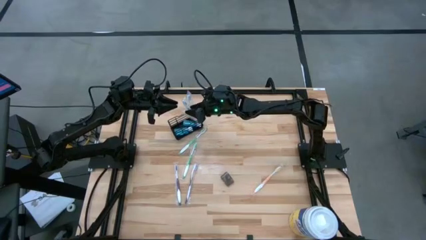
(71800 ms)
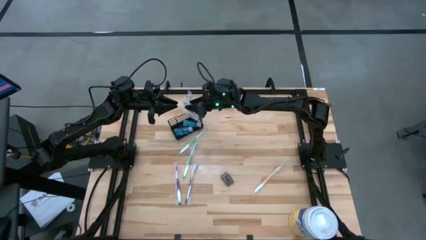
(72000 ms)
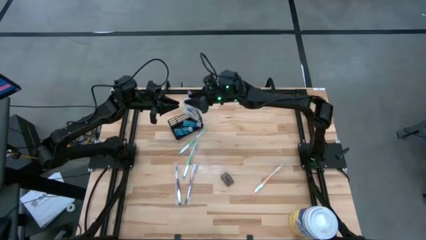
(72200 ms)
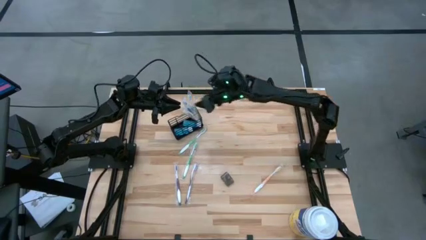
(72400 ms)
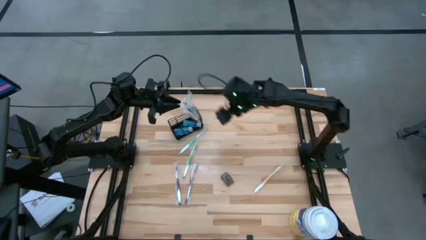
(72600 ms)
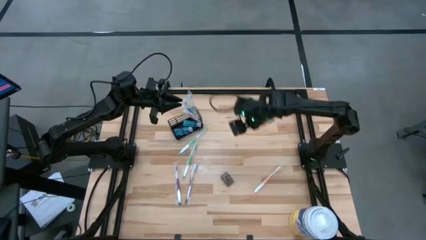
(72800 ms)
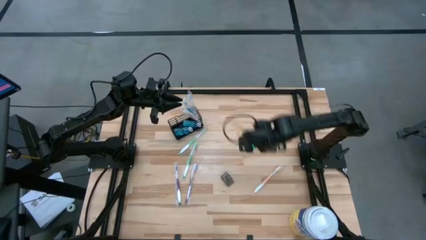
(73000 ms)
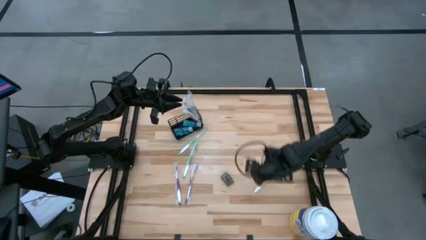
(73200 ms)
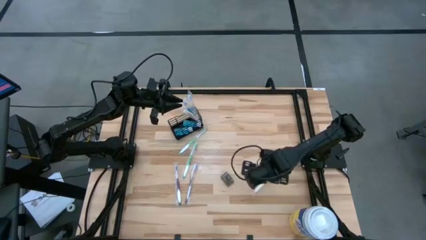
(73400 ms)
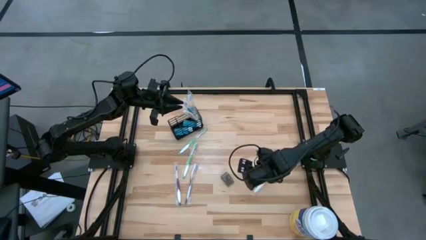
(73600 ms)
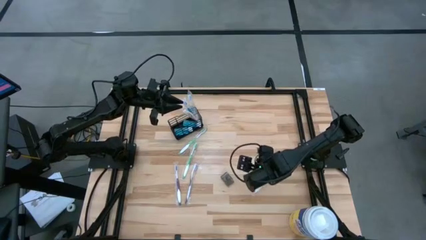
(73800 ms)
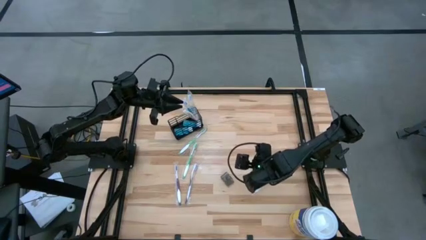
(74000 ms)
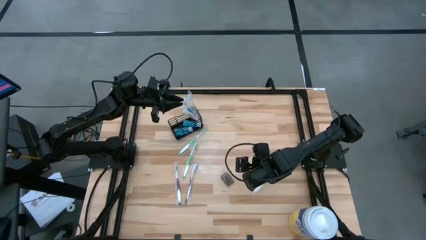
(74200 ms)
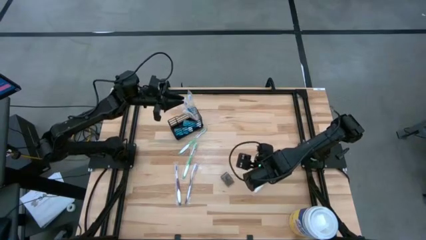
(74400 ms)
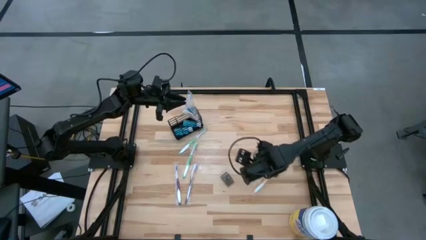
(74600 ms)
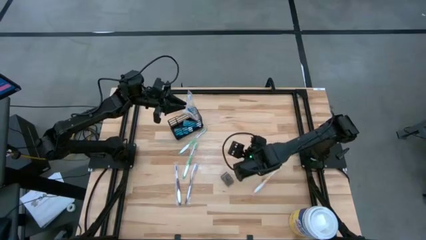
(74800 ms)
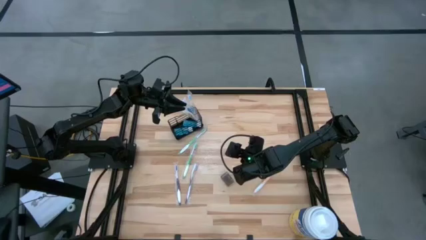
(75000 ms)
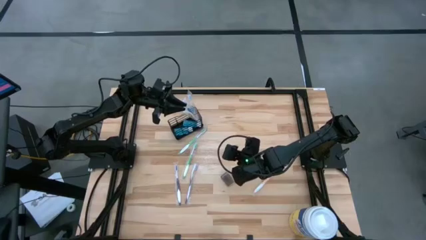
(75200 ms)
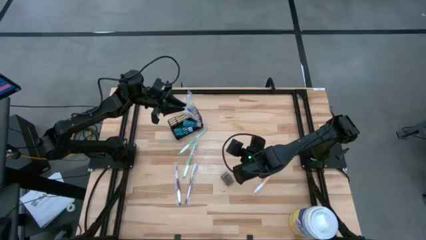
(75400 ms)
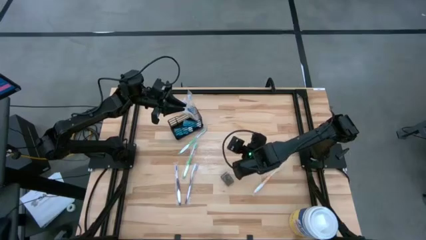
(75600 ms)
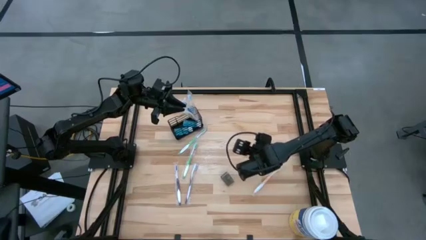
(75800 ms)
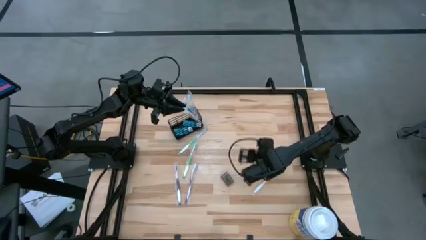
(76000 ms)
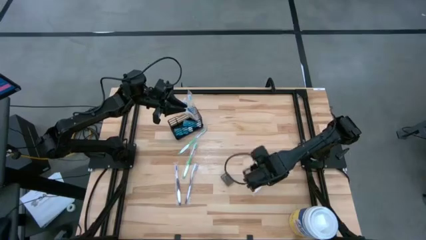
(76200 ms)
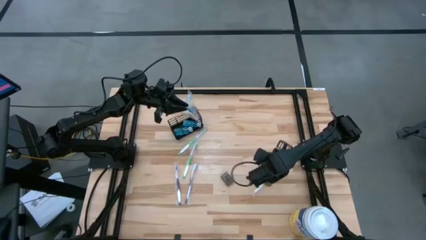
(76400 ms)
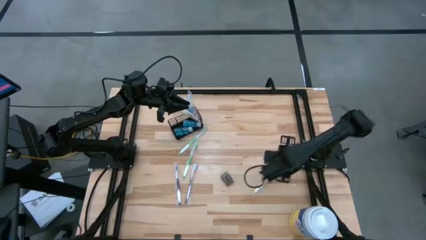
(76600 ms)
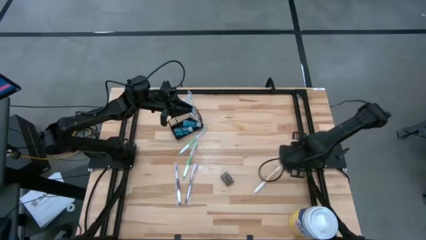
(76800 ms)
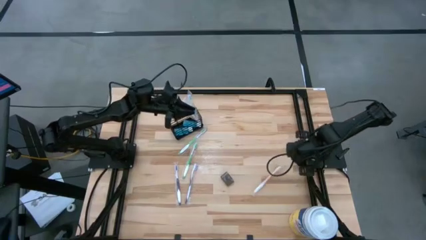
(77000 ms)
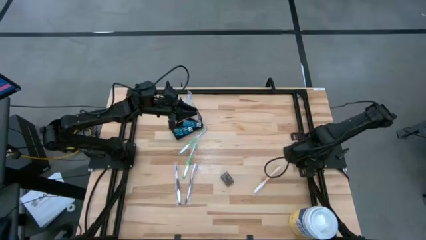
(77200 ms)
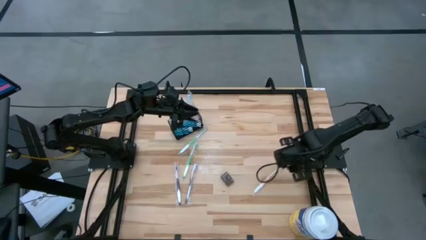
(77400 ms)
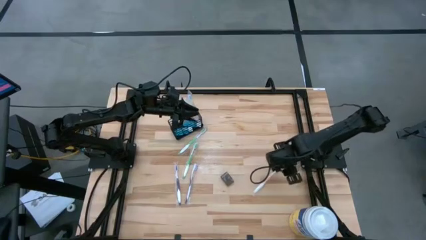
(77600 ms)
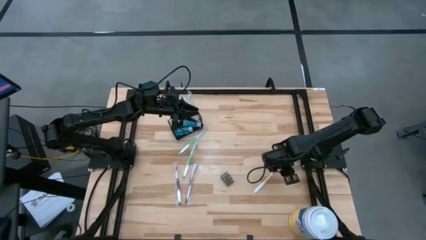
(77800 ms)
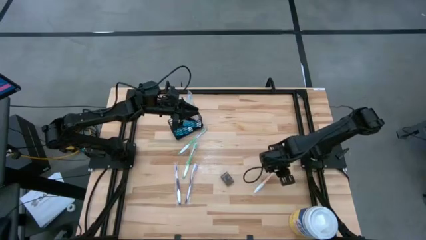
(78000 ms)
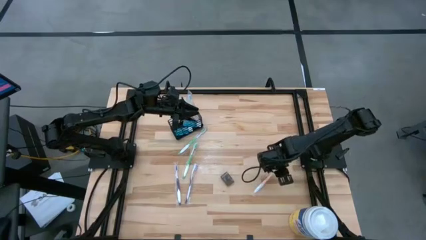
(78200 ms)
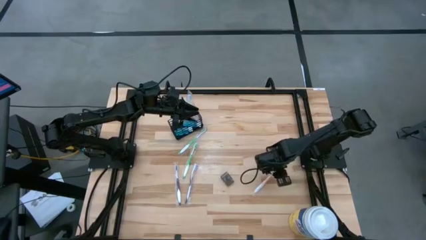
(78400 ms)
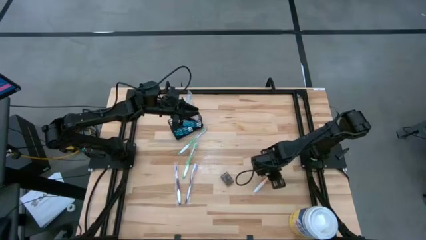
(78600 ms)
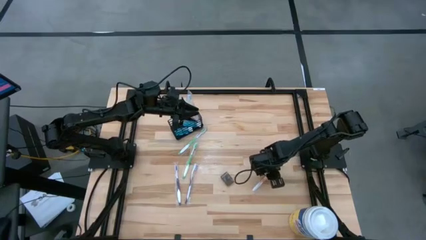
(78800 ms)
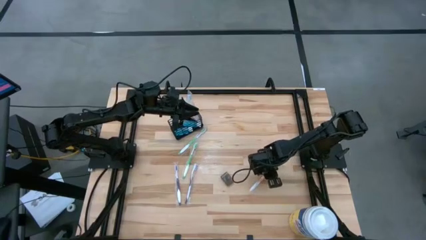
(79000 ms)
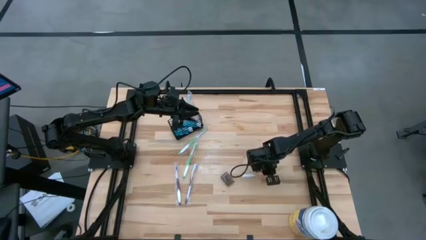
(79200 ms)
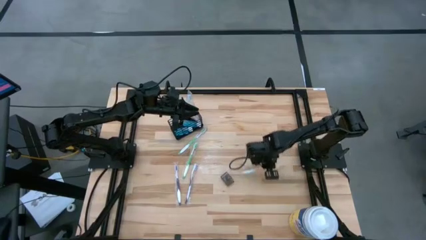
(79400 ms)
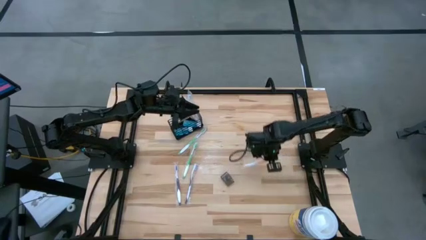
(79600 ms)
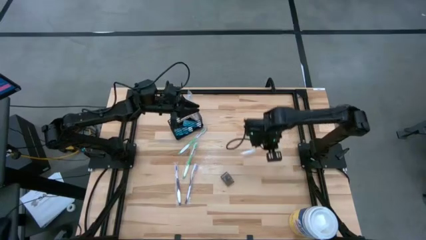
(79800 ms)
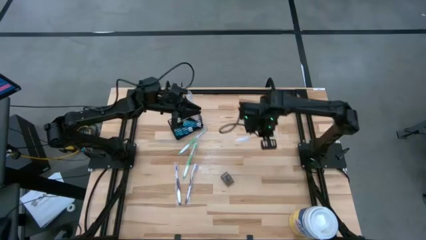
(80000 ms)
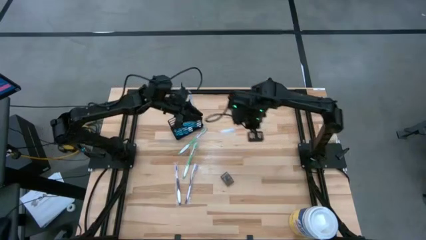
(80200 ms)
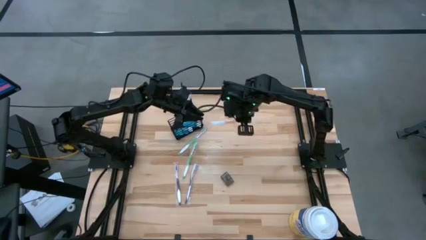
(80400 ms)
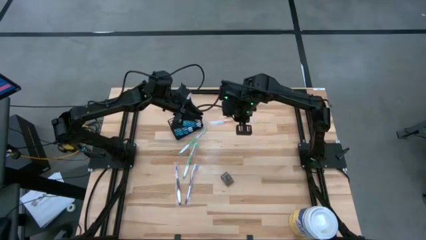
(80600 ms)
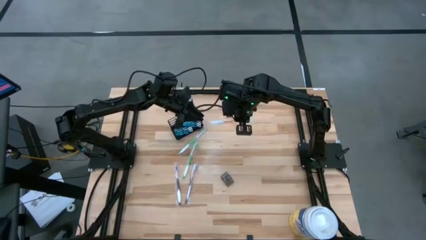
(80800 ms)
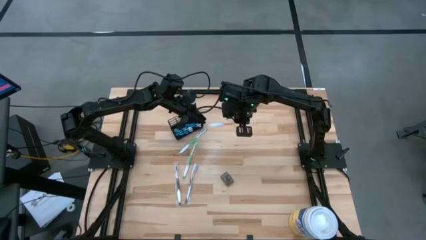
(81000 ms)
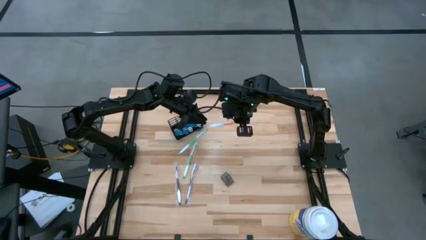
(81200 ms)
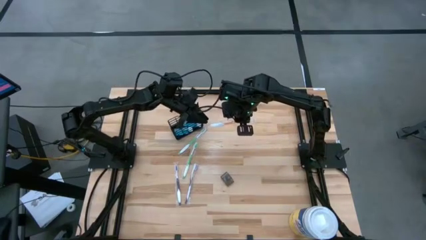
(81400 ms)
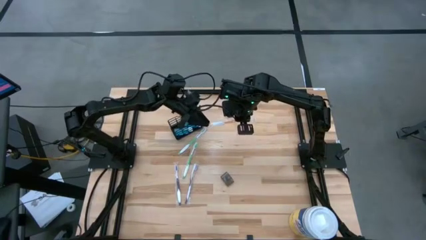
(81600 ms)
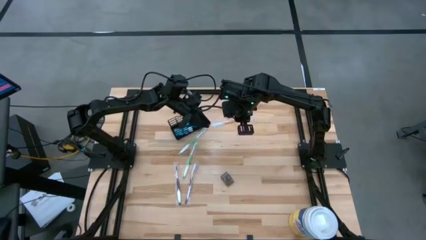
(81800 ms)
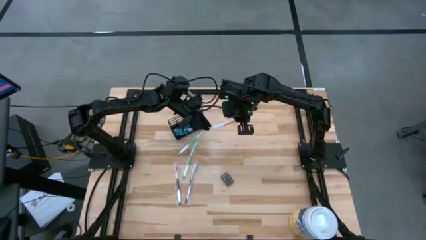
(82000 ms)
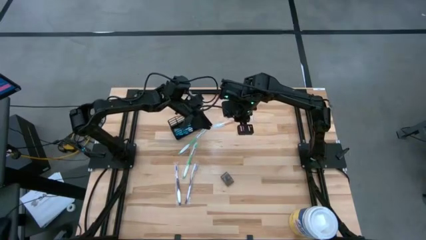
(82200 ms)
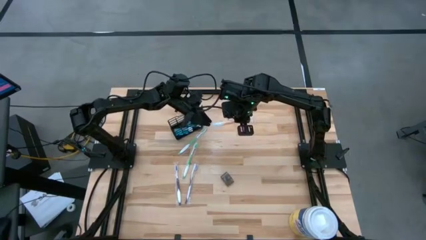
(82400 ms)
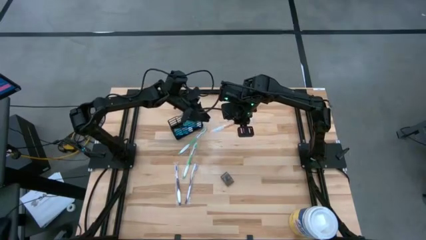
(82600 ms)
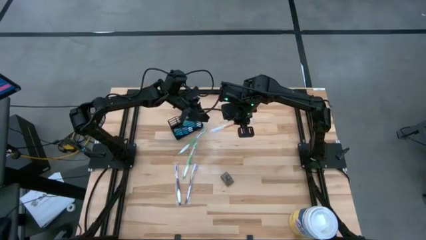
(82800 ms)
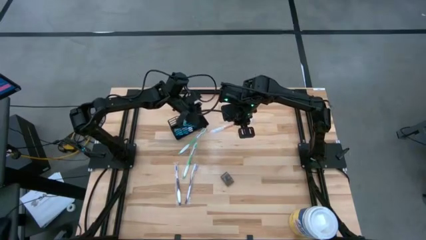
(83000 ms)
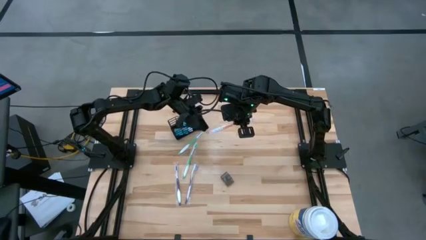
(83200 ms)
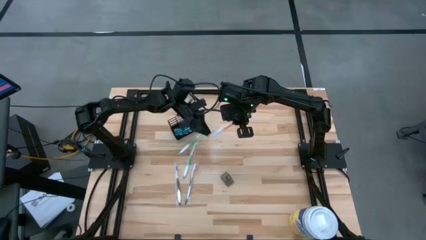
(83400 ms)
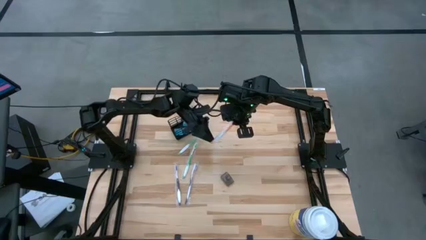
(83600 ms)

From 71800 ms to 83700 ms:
Task: Pick & Place toothbrushing station
Put the orange toothbrush into the black organizer

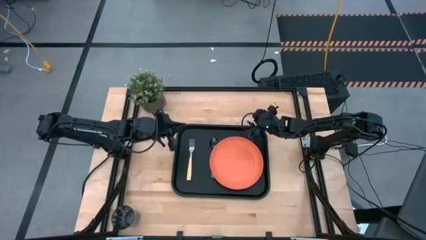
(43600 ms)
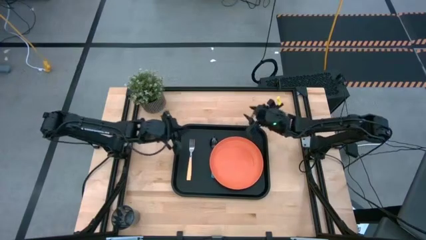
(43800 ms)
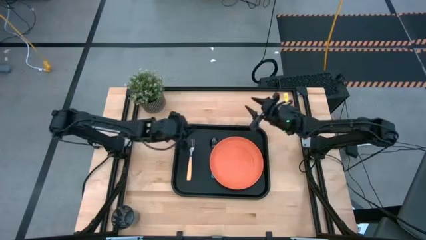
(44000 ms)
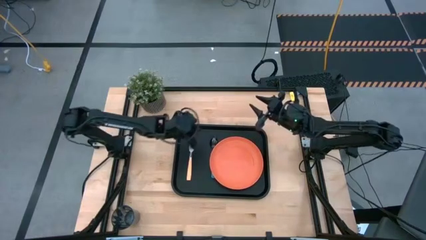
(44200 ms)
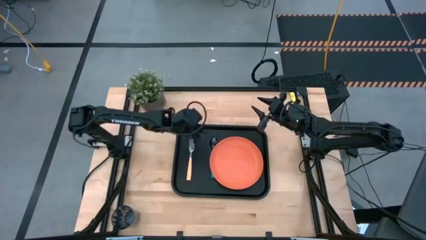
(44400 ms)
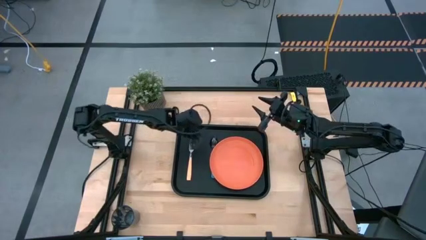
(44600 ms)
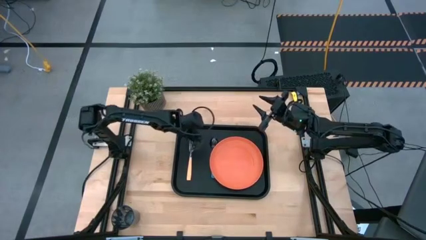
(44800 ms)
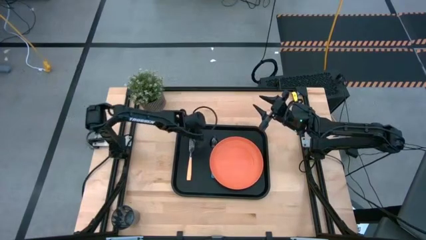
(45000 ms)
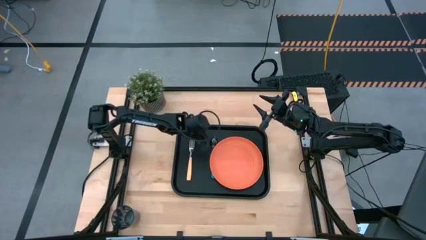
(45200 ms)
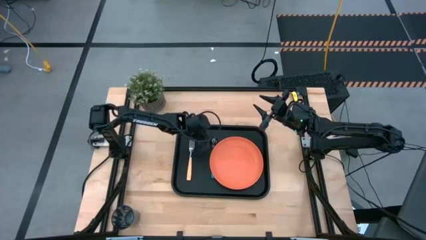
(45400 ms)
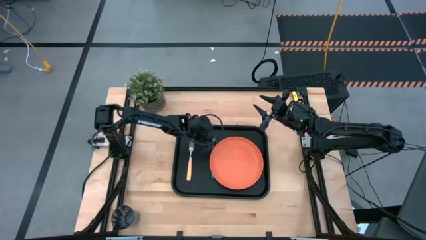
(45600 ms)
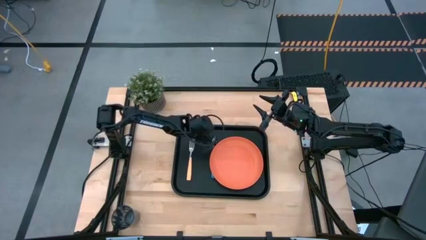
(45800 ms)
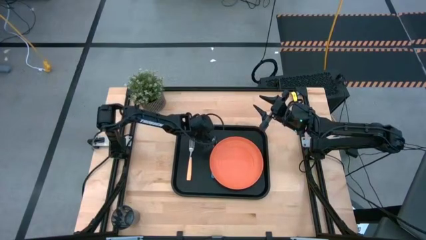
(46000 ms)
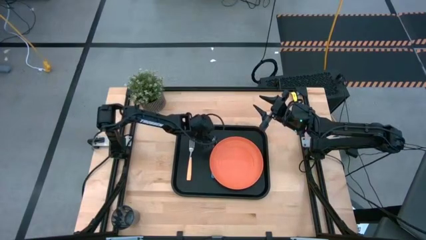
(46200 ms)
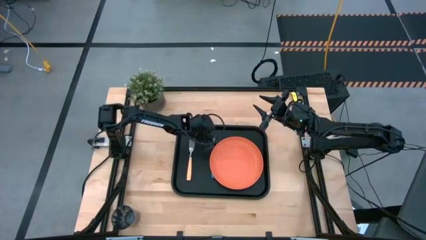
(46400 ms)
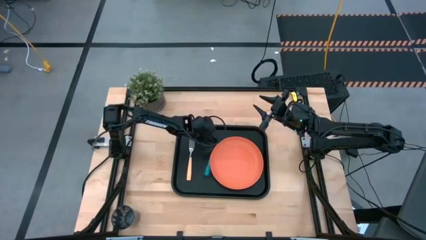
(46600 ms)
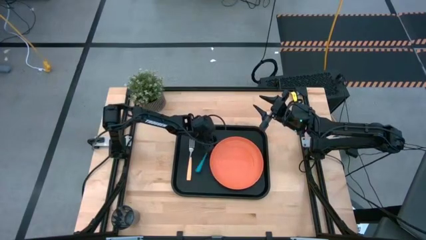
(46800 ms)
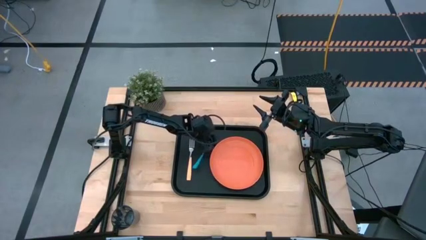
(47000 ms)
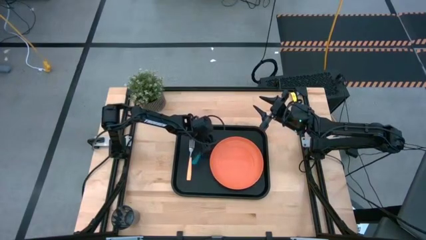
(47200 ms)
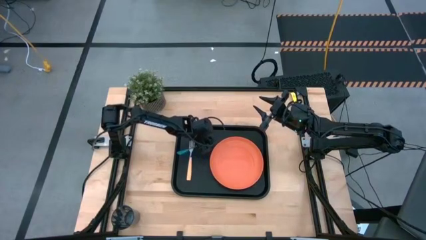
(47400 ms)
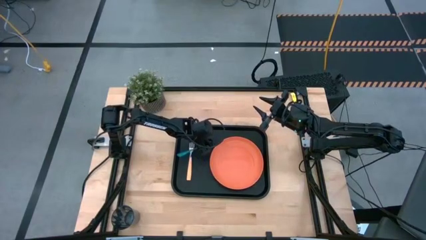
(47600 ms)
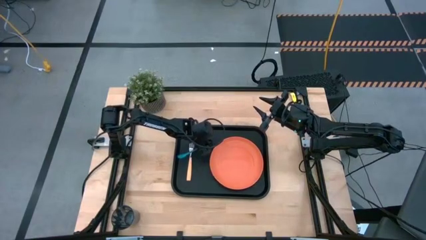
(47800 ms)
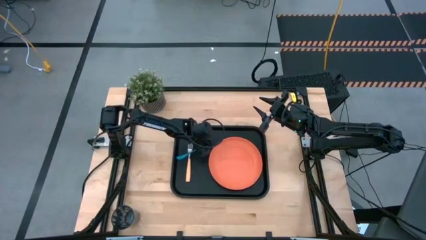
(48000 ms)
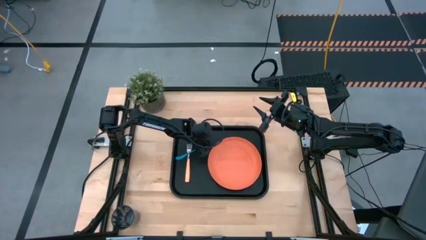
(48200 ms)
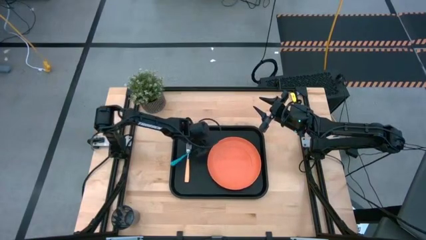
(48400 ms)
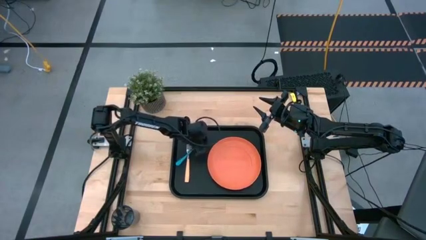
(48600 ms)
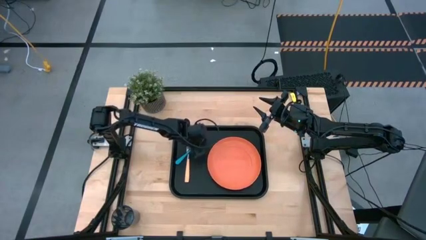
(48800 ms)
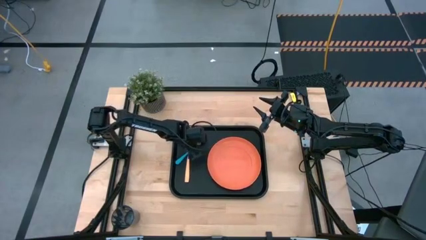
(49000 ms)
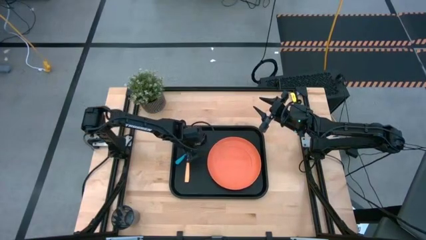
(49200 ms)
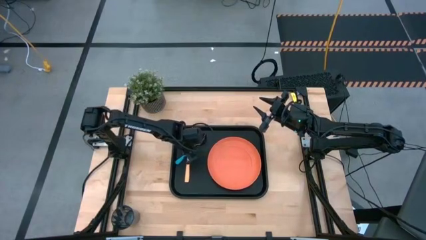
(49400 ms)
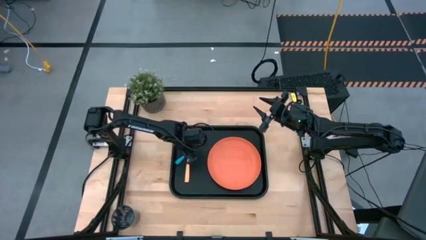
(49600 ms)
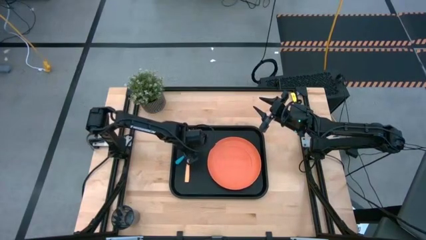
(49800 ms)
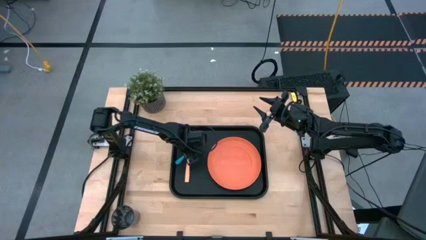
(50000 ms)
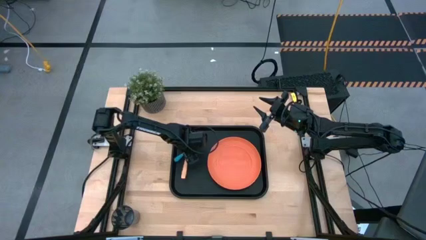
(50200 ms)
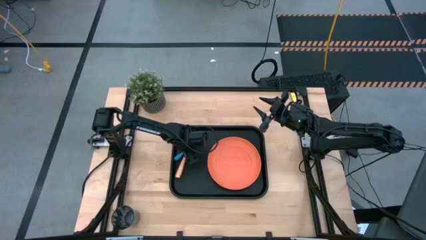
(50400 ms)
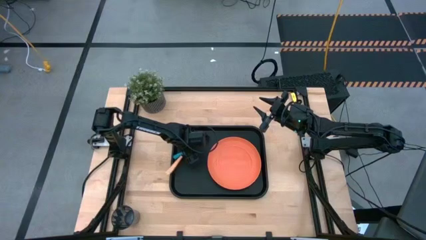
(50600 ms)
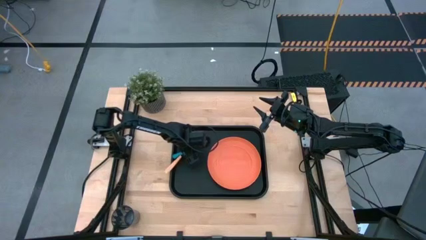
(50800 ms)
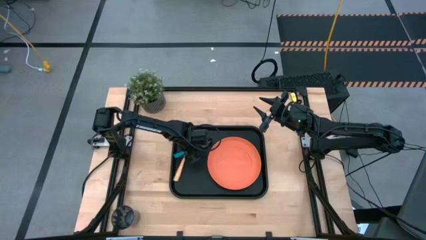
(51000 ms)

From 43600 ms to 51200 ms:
Task: Pick and place plate/cup/fork/spoon on tray
Adjust the blue spoon
